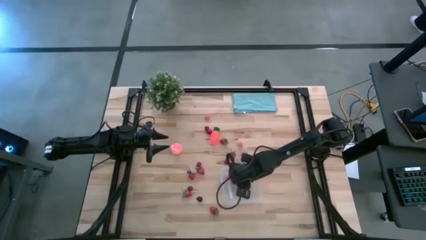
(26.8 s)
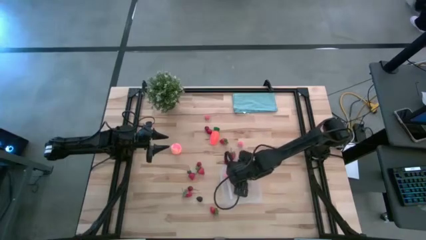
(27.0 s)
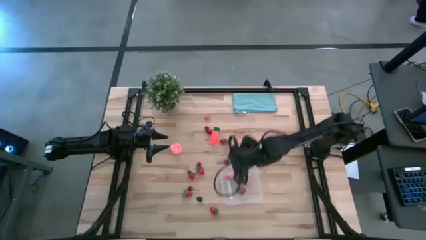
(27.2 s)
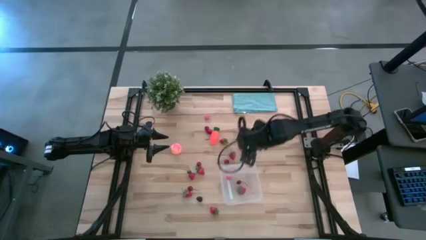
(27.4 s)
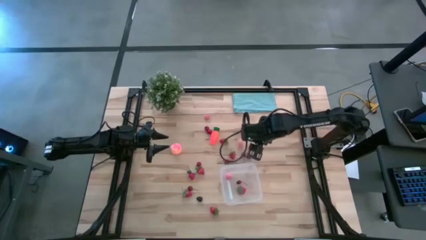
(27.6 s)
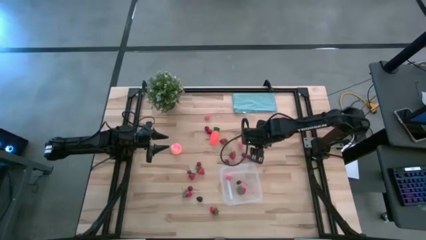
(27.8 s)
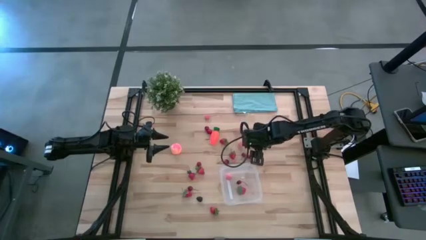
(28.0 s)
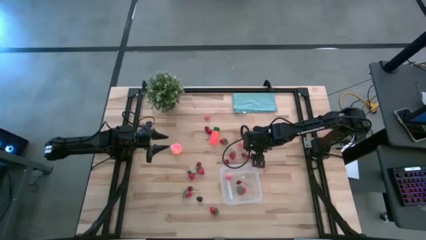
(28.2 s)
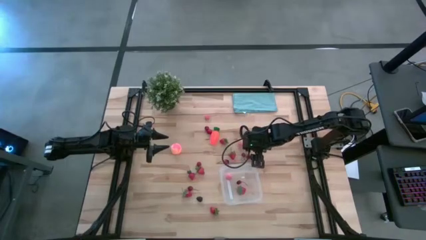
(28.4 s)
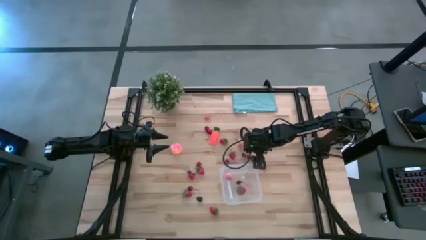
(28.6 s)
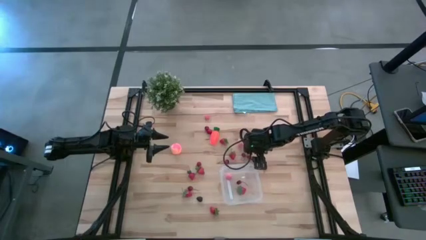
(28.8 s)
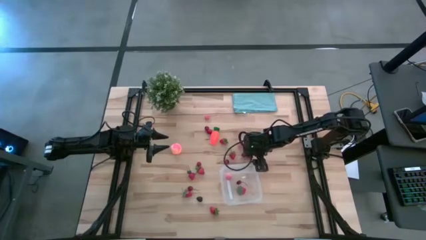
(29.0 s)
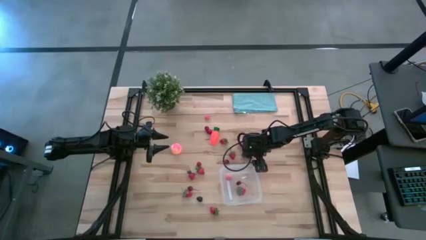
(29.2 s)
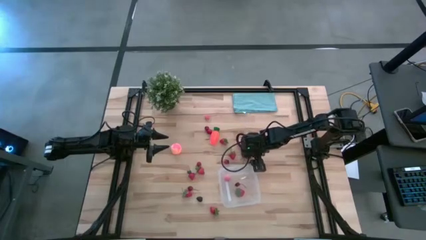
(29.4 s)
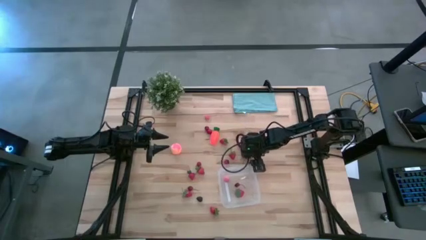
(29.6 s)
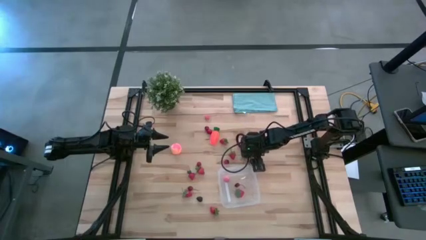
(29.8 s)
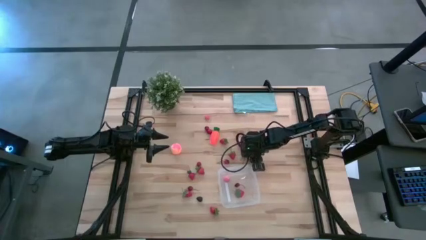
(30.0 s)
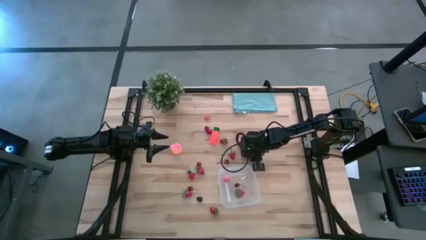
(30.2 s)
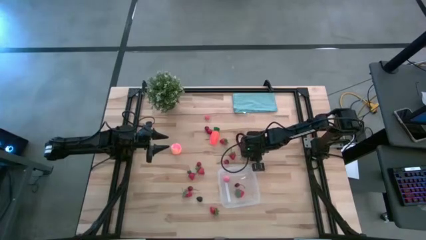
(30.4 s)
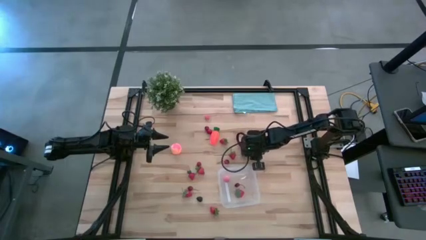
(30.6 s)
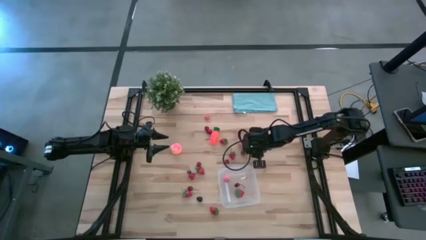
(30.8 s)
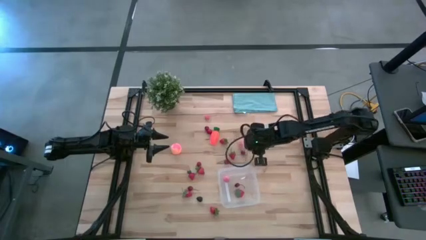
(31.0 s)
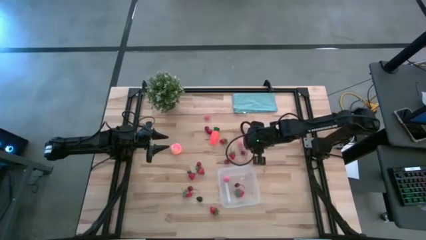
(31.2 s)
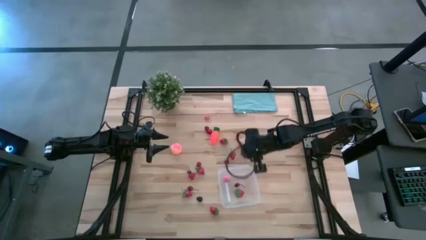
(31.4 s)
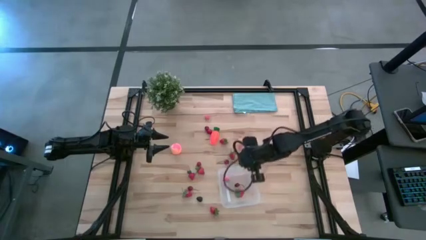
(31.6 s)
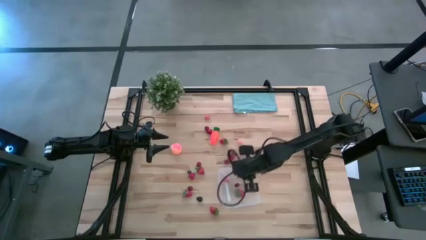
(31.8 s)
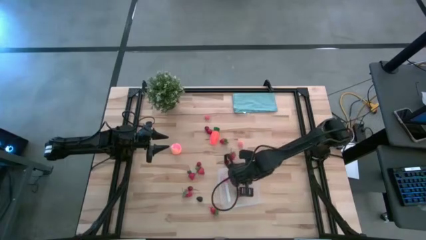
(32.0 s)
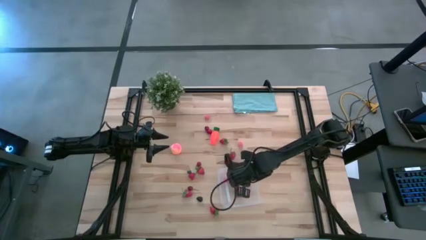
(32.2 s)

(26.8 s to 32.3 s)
Task: Pick and placing Produce into tupperware
Put the red cherry into the transparent container

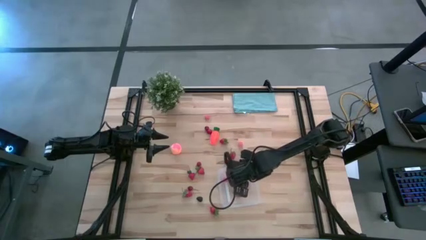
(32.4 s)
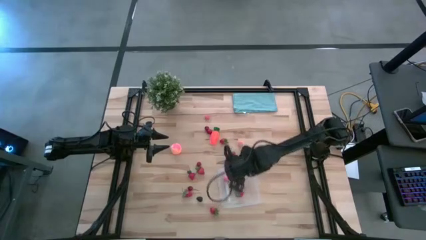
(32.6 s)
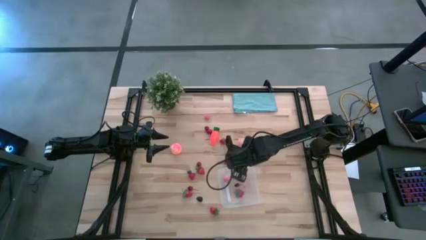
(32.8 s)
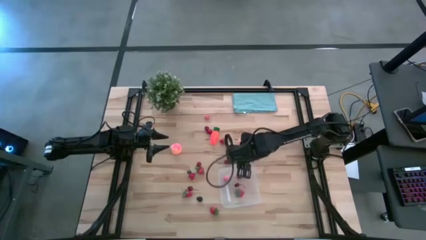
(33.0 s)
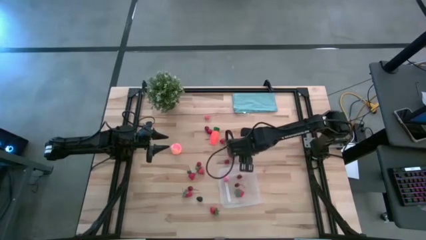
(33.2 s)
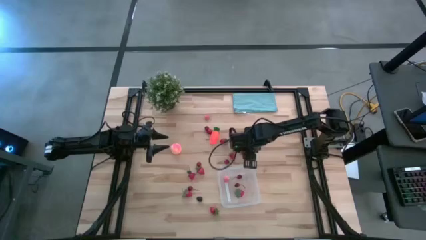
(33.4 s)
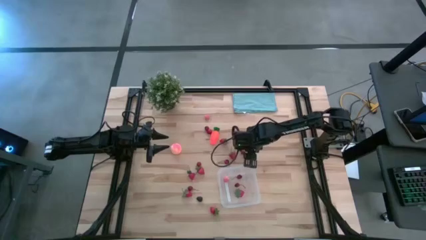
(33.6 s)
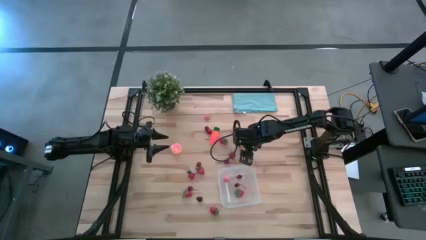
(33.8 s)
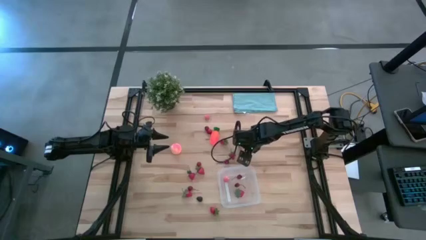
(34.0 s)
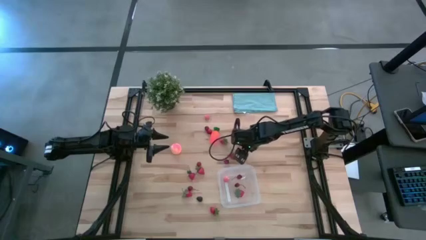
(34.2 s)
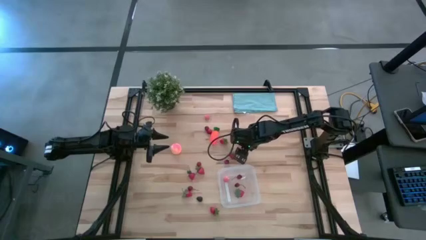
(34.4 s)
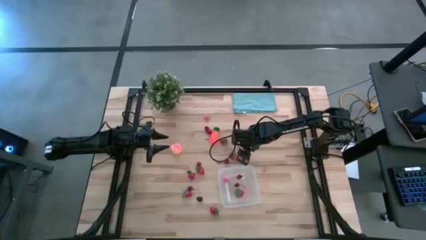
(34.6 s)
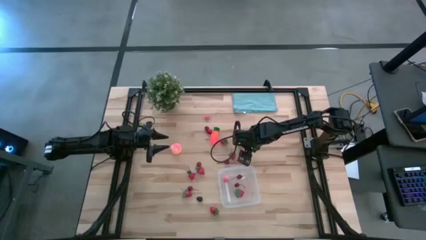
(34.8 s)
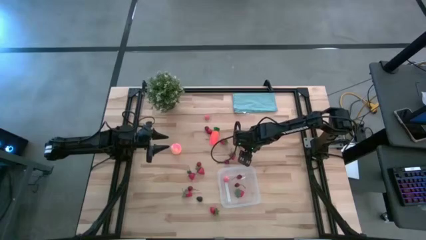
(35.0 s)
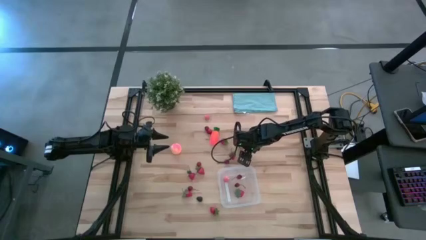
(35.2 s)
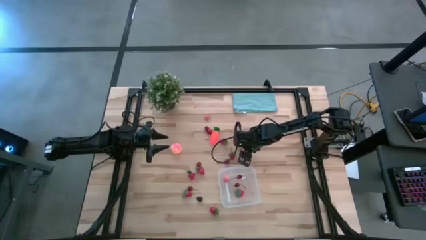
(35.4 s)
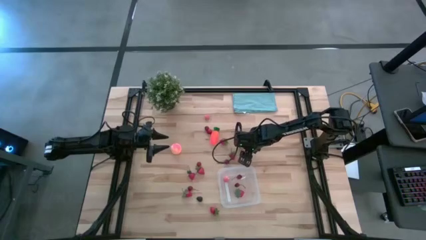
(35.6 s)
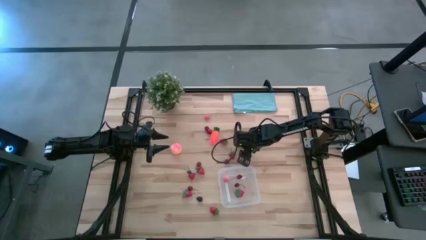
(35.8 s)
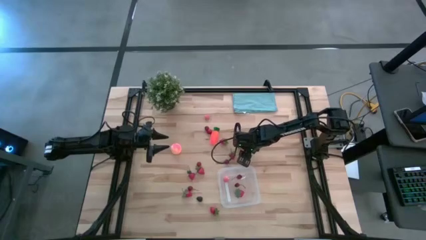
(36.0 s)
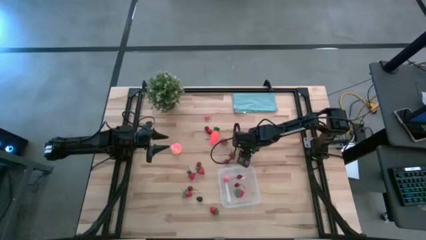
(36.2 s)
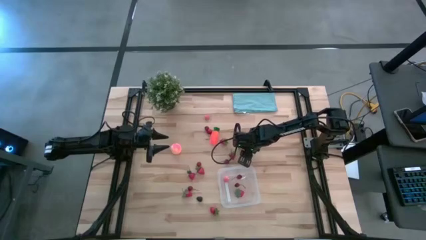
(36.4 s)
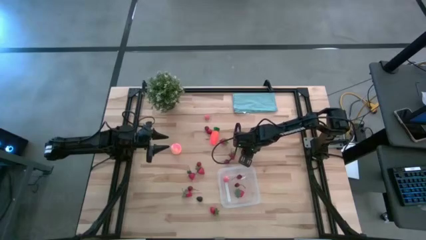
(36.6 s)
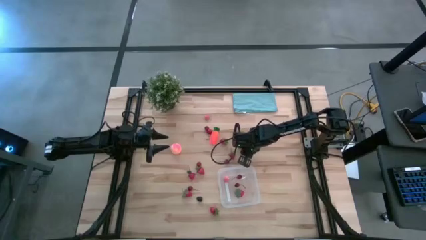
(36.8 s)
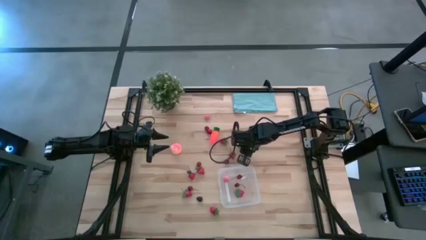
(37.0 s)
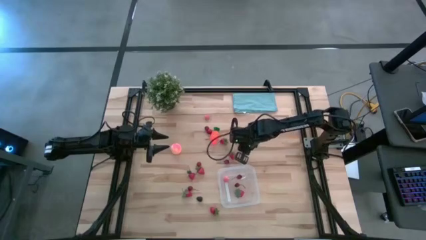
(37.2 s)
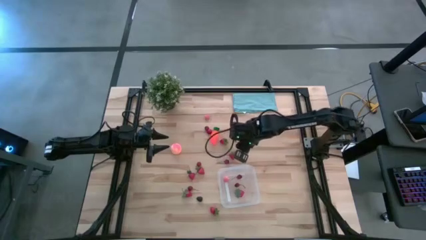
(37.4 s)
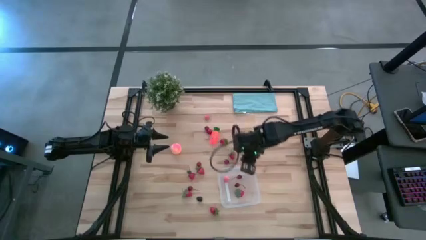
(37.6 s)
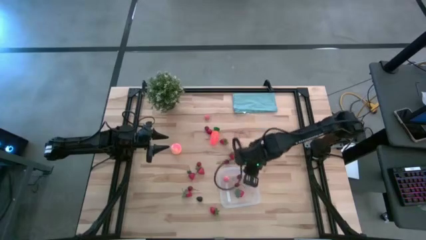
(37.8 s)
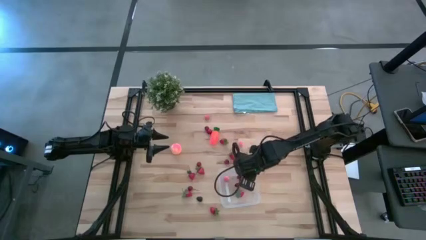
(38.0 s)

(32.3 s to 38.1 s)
Put the red cherry into the transparent container

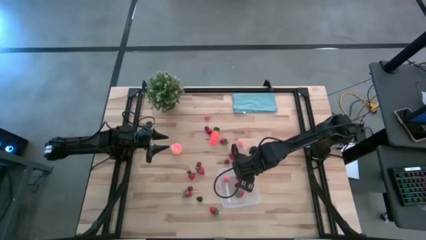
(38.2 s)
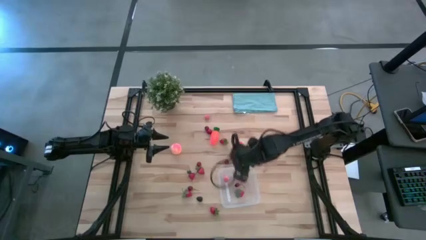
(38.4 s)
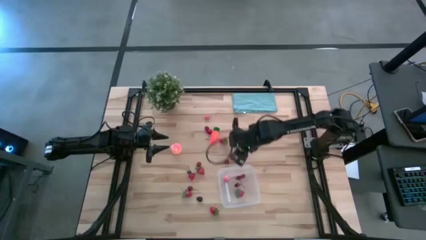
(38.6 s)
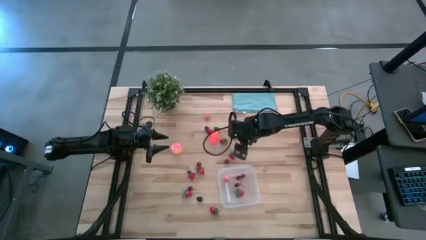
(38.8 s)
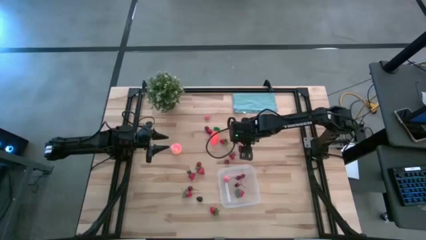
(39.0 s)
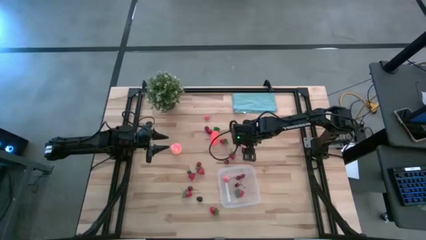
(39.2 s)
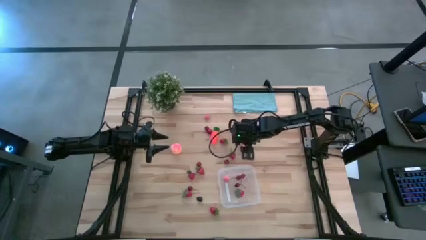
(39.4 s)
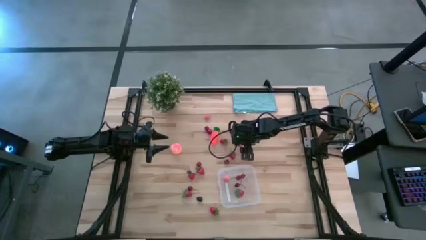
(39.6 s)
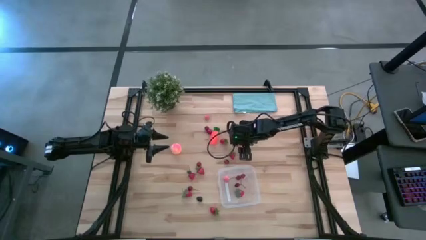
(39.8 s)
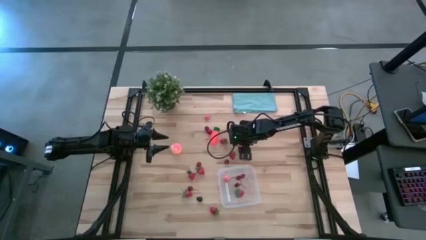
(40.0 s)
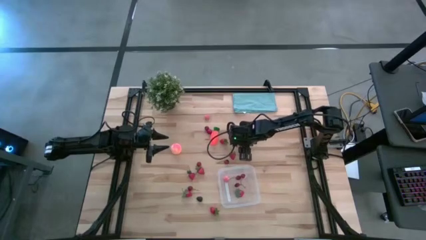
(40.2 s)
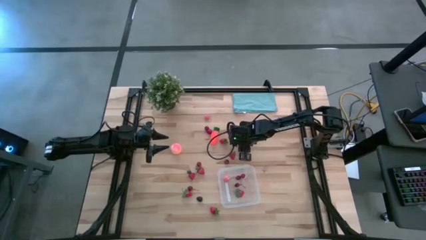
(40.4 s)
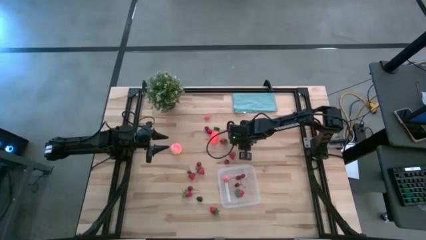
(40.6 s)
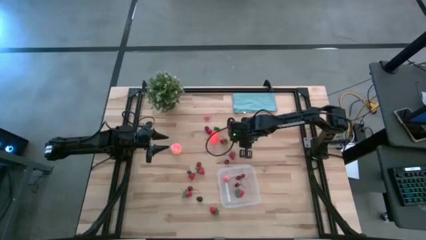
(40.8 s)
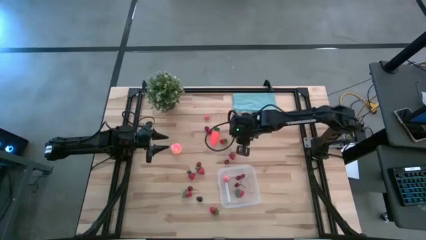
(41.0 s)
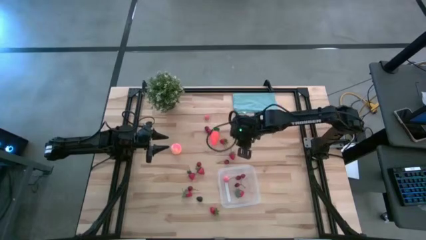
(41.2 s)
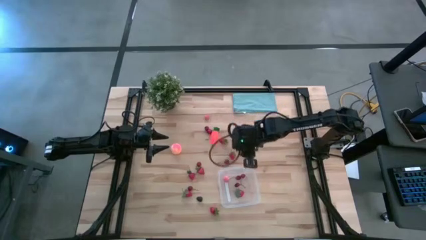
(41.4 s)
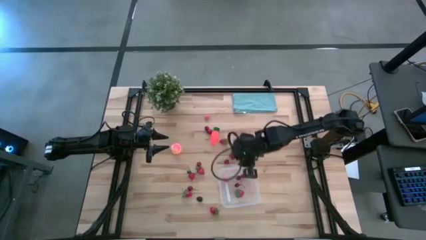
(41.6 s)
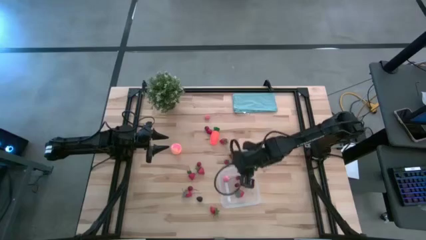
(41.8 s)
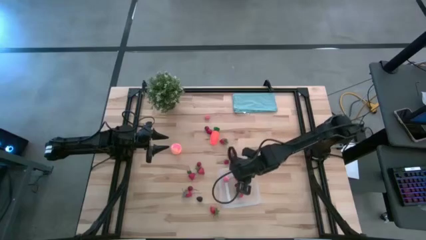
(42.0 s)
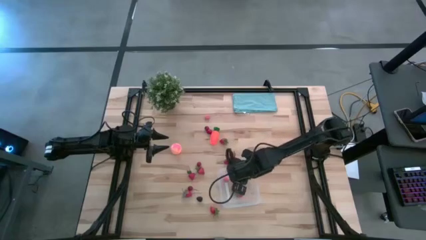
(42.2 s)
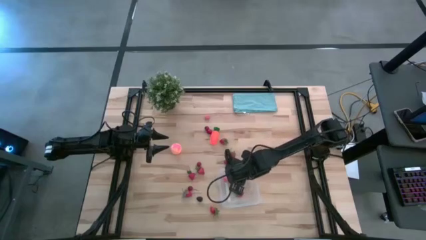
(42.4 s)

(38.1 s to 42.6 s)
Put the pink peach into the transparent container

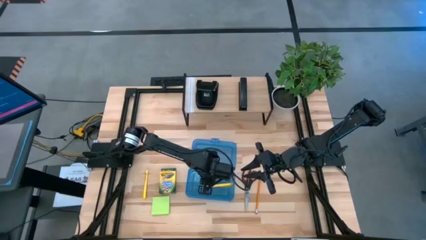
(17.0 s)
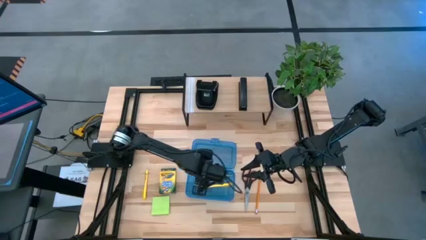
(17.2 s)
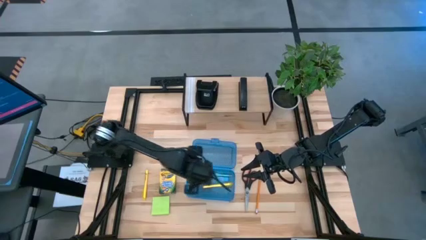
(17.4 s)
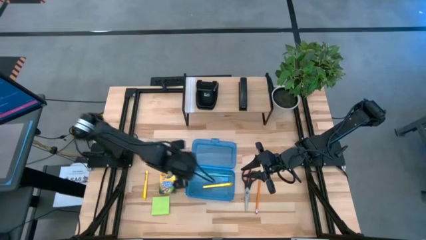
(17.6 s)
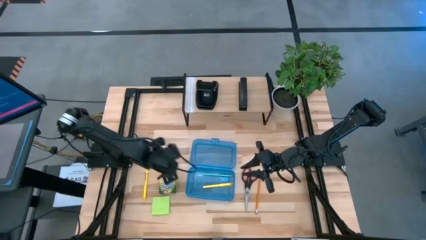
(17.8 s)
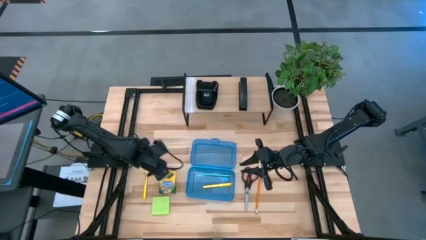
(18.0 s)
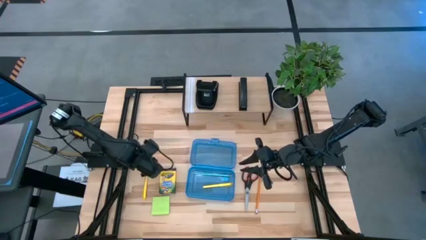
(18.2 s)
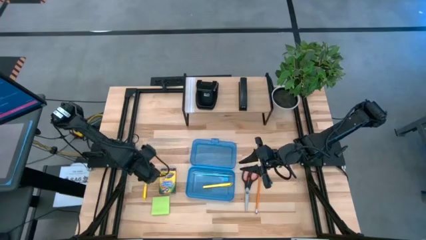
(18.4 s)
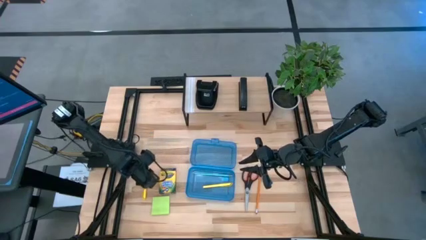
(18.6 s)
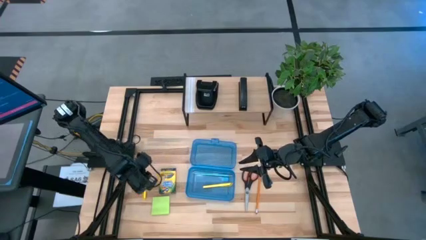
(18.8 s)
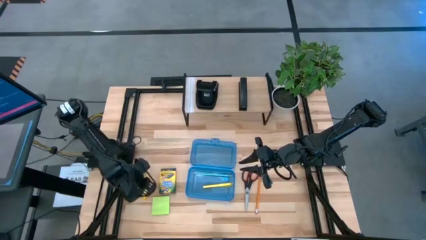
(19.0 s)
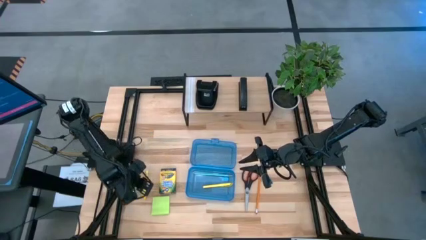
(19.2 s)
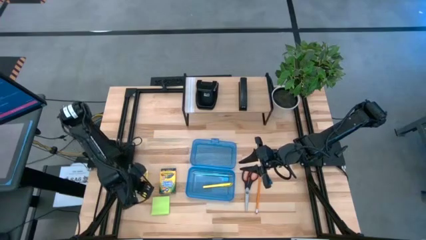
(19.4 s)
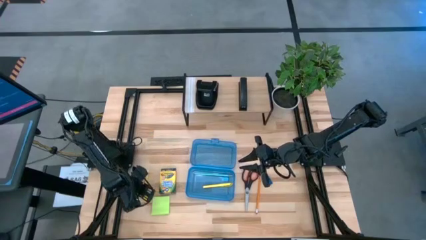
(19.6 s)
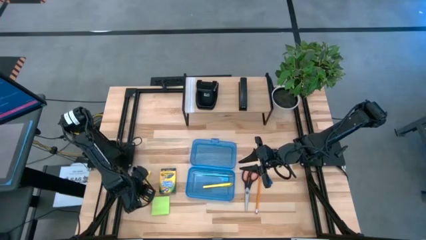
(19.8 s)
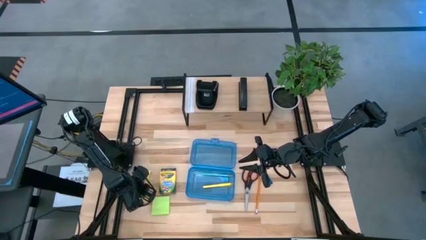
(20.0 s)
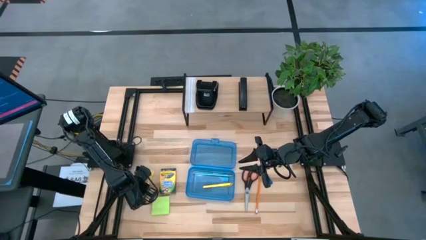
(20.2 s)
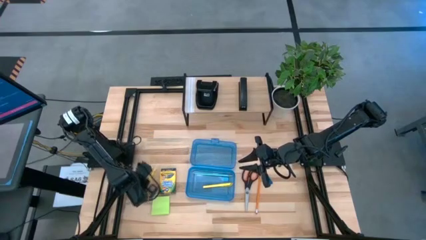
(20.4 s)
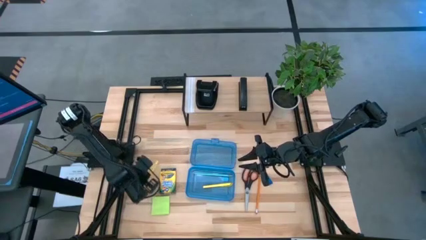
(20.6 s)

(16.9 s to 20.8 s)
Task: Pack school essentials
Put the yellow pen into the blue supply box
